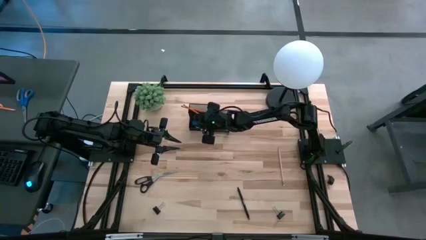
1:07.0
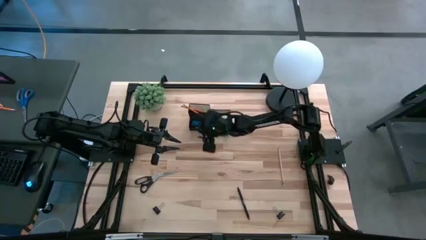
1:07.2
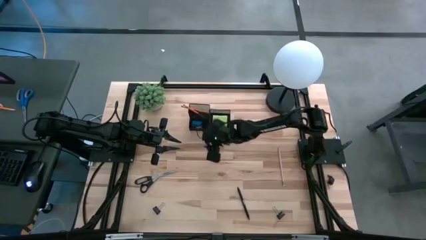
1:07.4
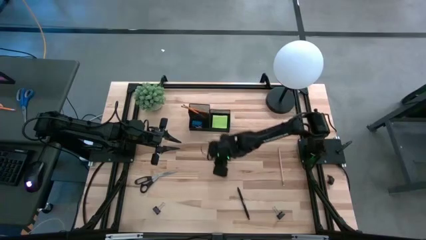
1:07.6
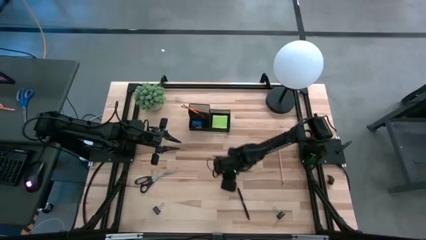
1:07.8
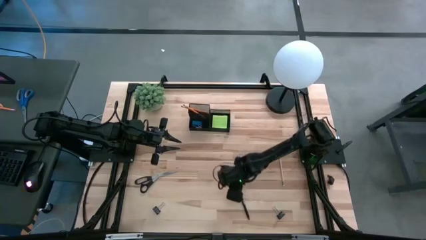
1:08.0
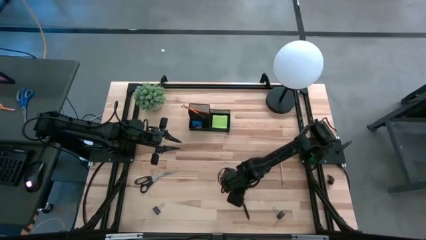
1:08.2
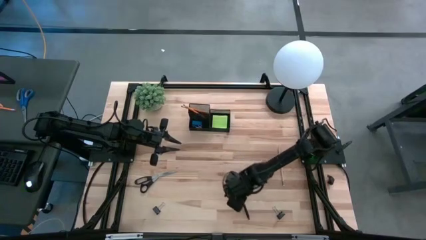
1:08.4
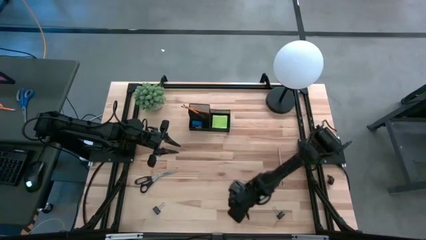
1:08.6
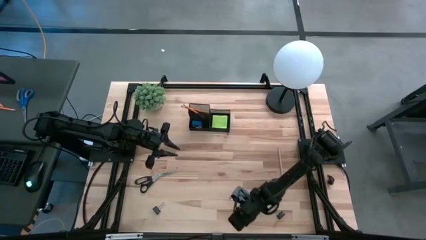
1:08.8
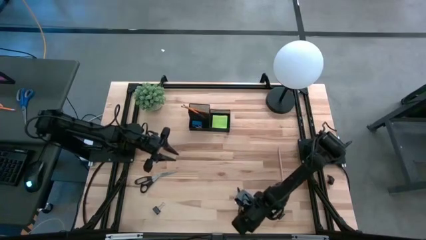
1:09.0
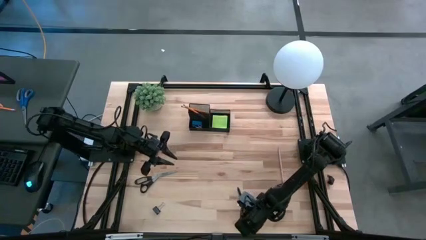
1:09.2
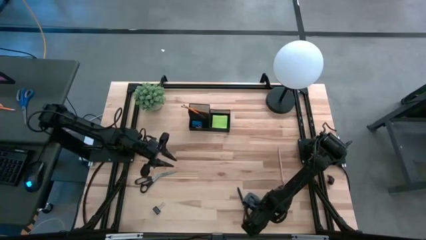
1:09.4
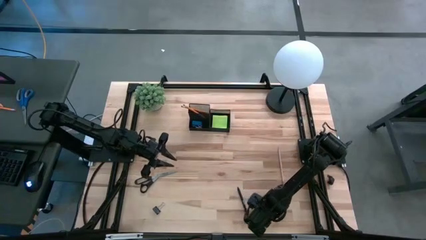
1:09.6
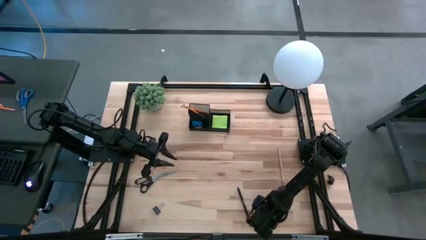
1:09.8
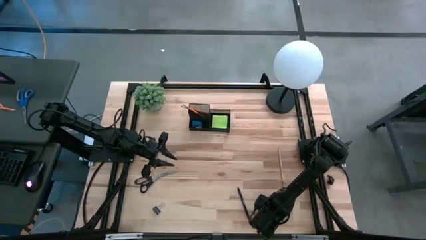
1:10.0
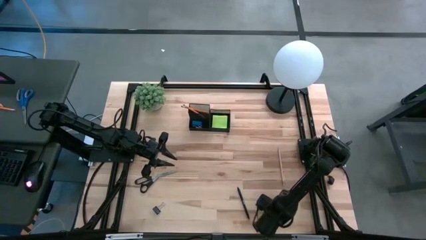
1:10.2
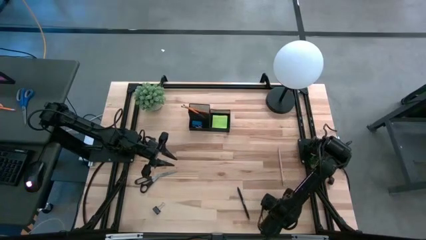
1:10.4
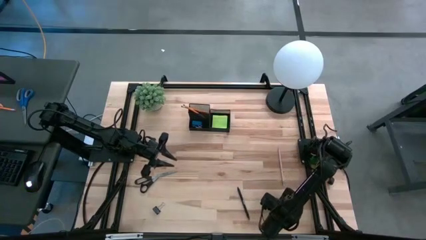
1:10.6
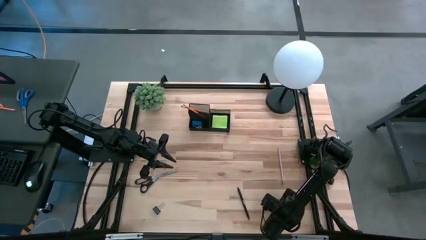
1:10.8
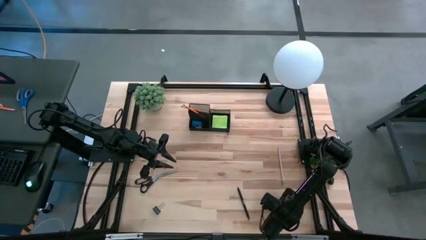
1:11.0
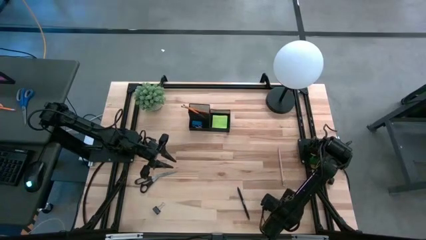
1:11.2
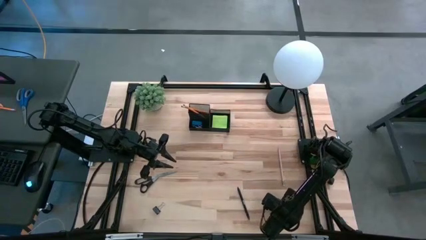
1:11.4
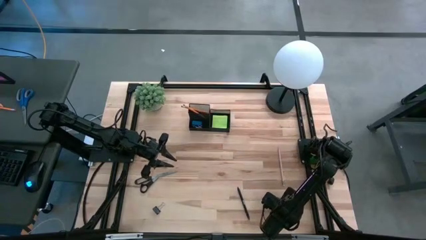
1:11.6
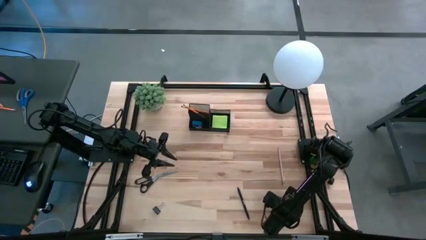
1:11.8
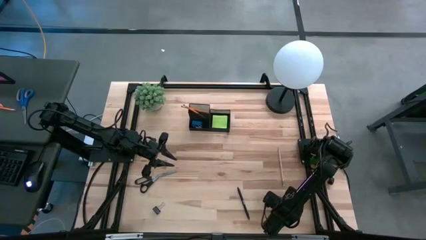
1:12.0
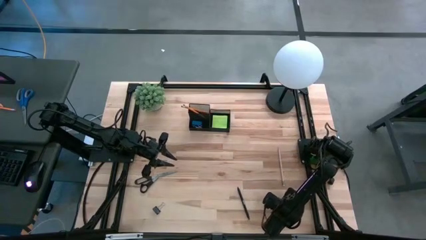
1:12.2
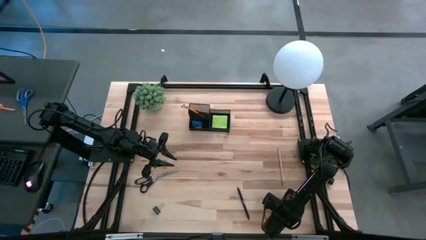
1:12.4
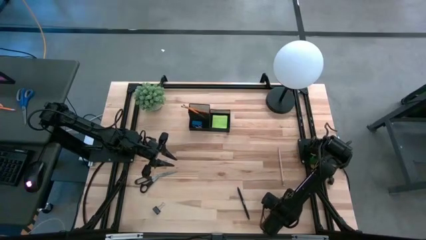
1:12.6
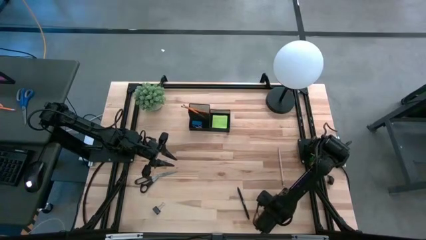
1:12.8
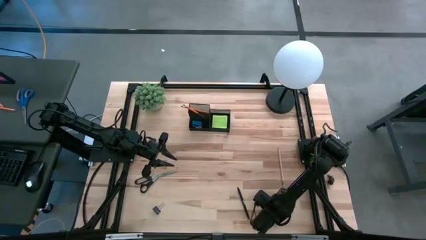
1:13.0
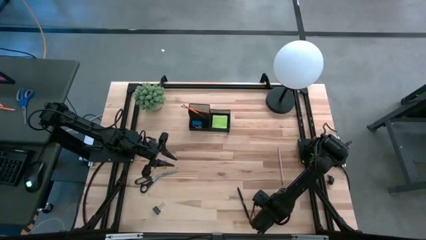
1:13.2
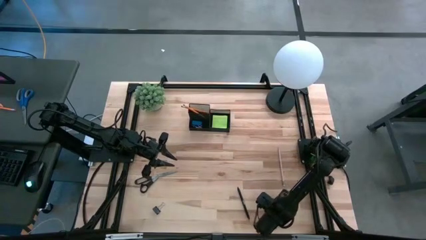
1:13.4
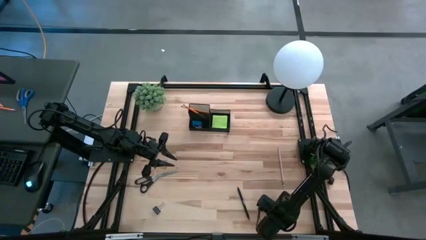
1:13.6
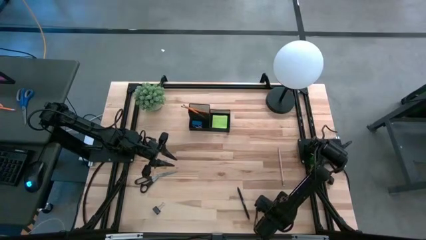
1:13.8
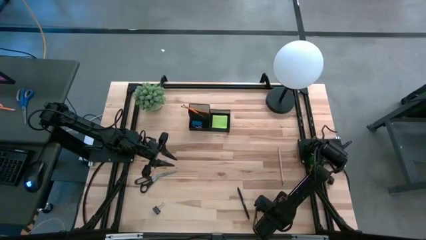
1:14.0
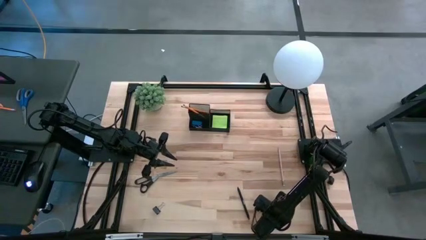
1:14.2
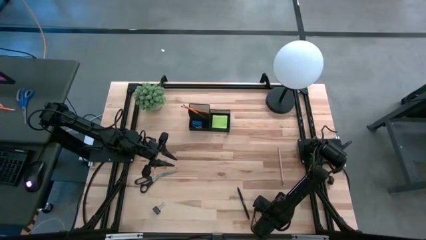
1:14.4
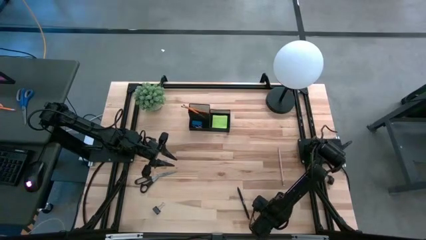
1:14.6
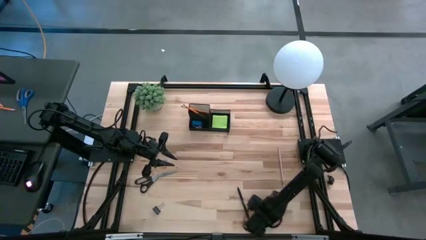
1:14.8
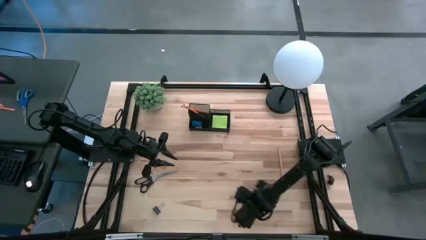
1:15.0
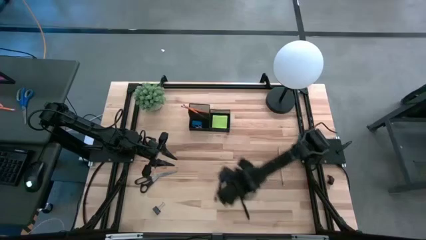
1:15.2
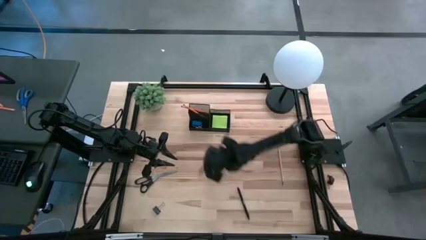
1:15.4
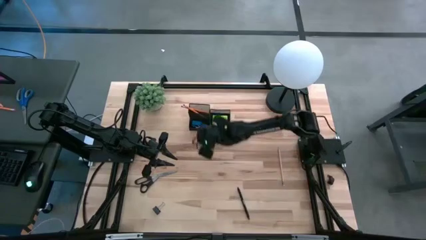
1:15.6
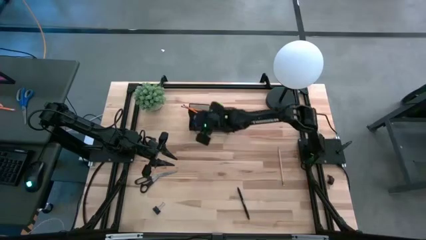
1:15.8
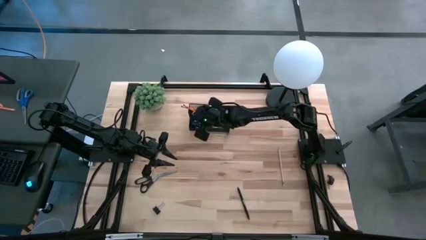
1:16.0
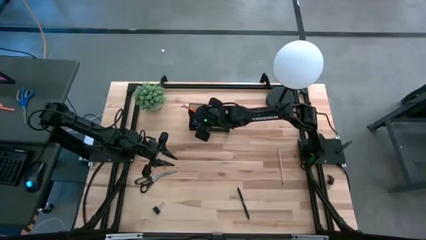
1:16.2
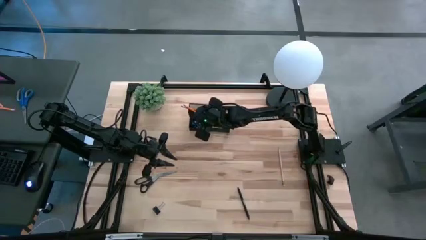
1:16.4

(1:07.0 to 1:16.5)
Task: Pick and place office supplies into organizer
Put the right clip binder into the organizer bin

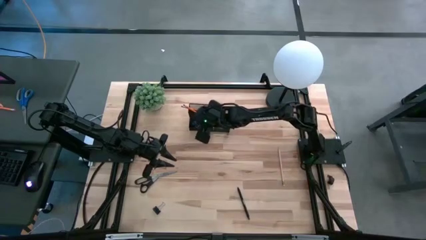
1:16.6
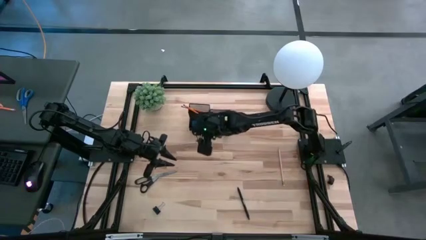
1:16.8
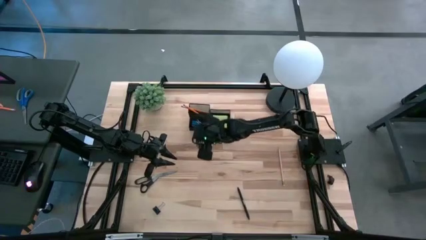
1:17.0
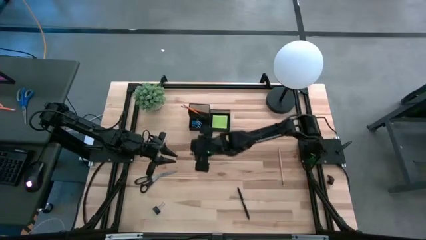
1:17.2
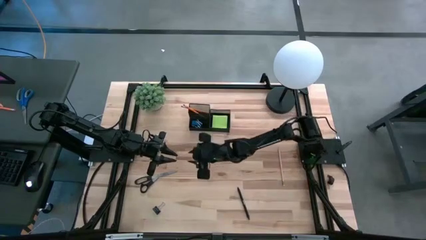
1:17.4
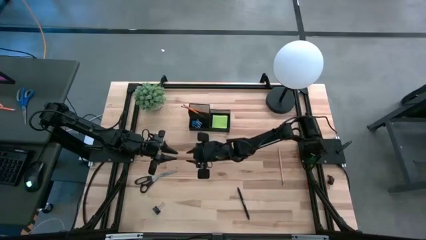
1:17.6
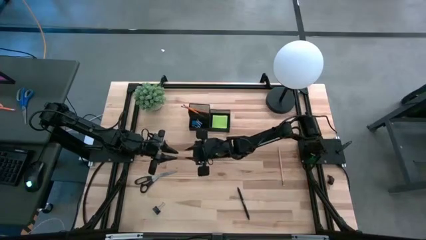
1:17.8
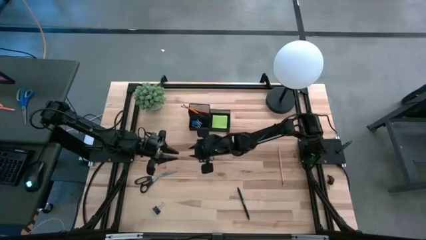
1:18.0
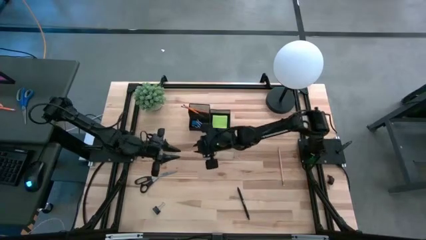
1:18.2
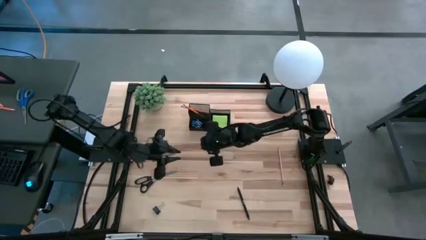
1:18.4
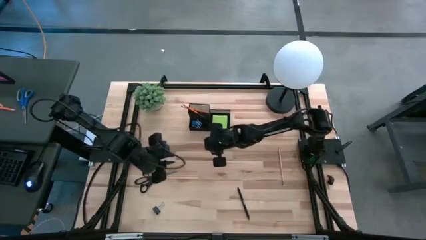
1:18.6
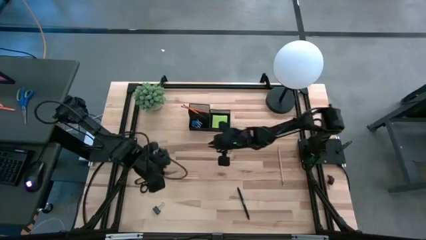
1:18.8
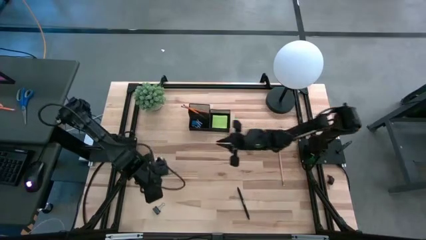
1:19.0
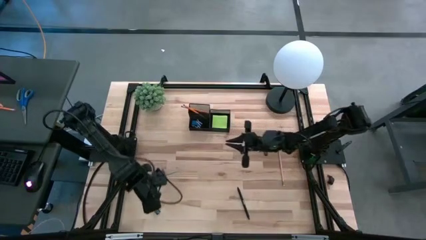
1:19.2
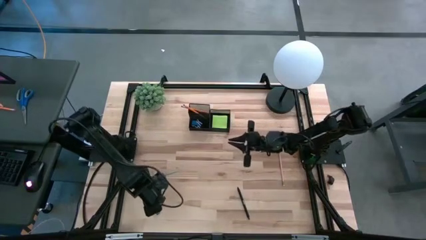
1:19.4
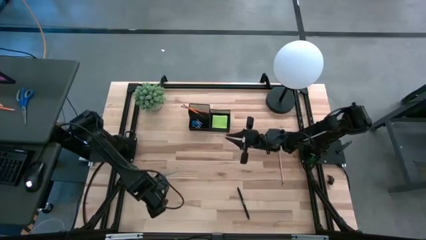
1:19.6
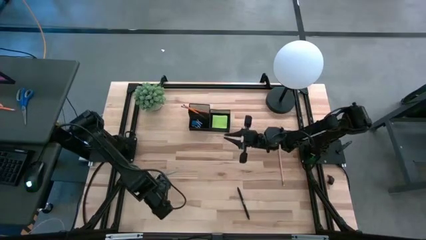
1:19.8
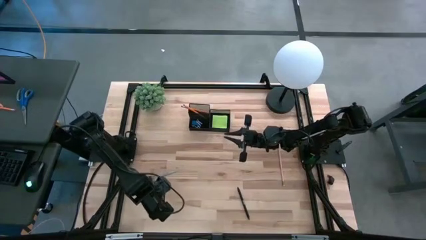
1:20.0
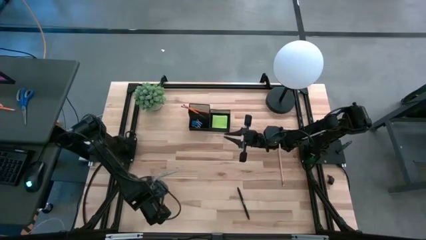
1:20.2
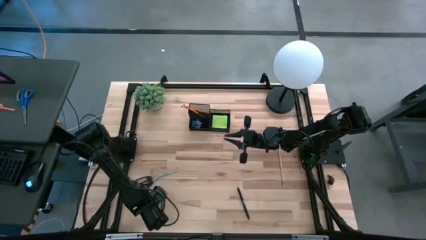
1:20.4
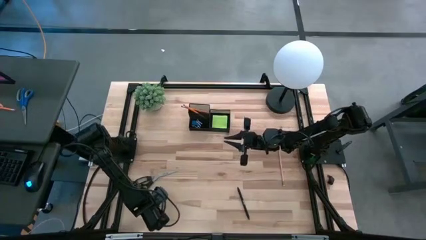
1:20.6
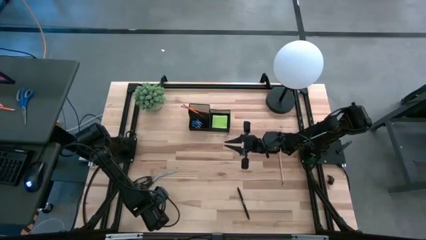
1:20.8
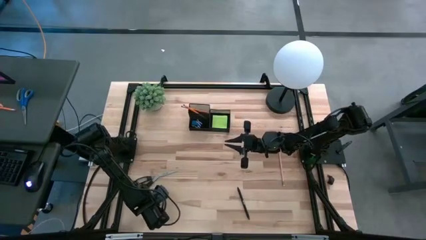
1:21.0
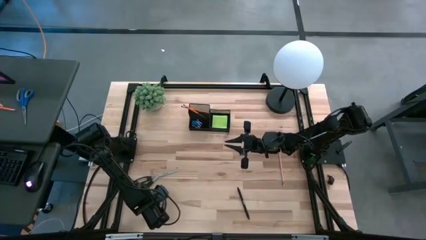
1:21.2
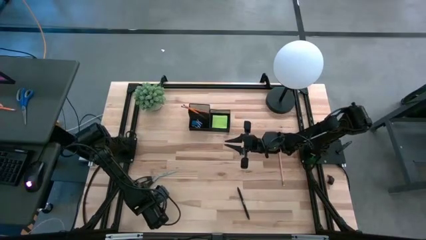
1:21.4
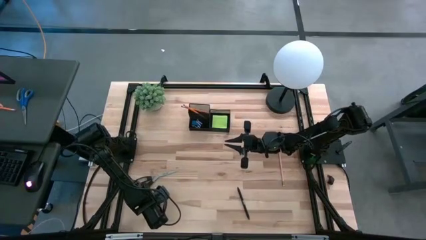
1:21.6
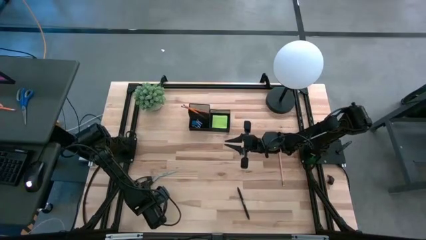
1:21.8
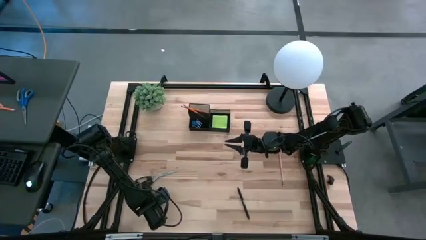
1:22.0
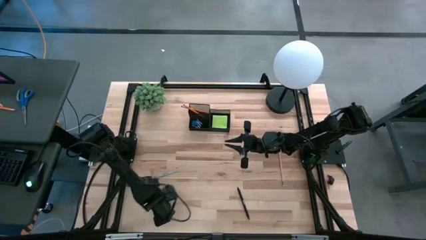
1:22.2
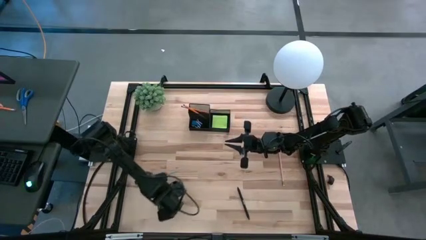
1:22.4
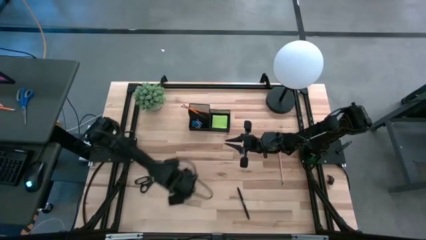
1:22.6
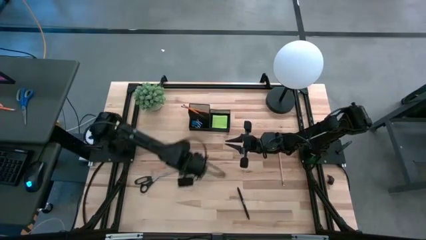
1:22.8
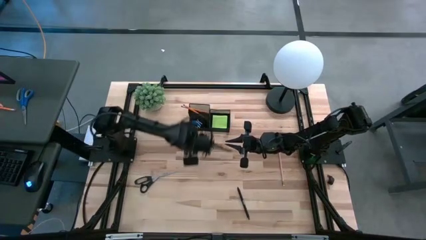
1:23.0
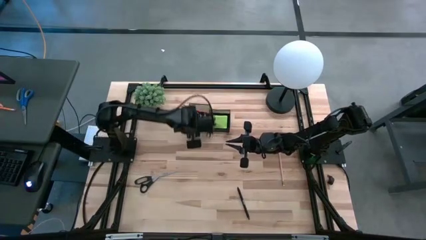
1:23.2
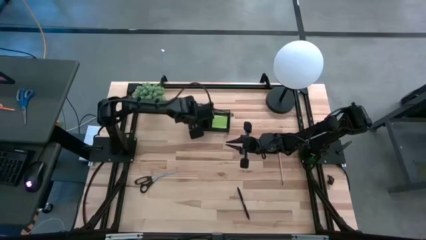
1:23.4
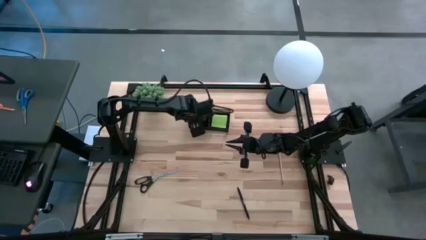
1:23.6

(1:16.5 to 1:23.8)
Put the clip binder into the organizer bin
